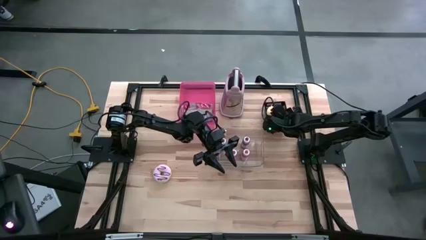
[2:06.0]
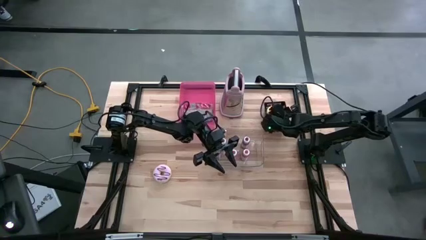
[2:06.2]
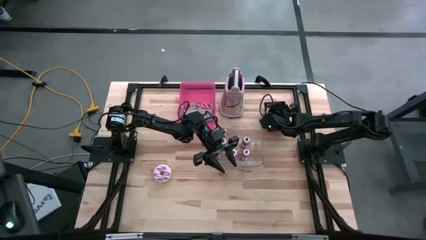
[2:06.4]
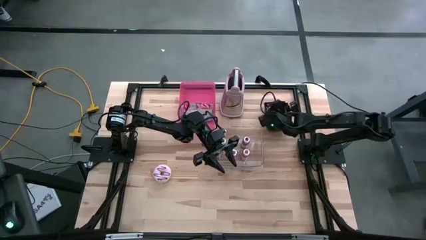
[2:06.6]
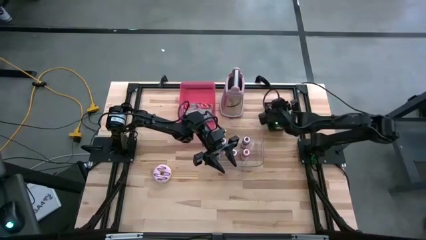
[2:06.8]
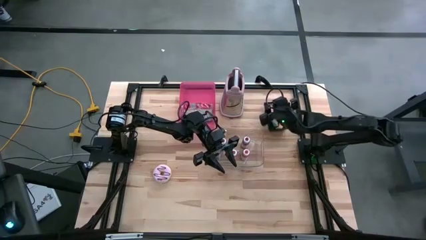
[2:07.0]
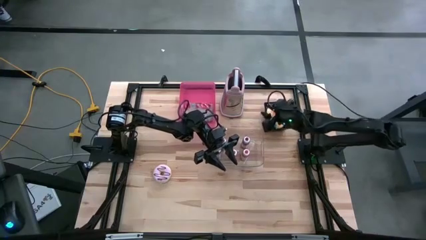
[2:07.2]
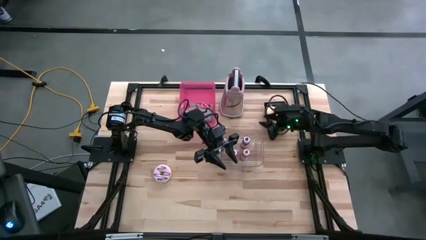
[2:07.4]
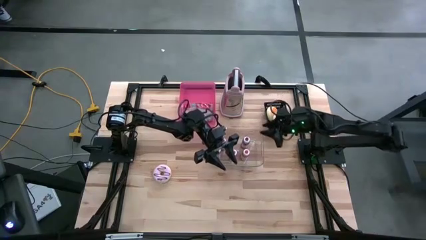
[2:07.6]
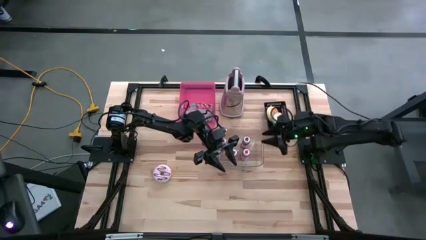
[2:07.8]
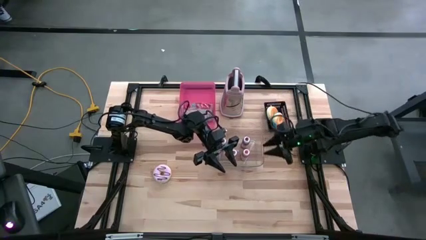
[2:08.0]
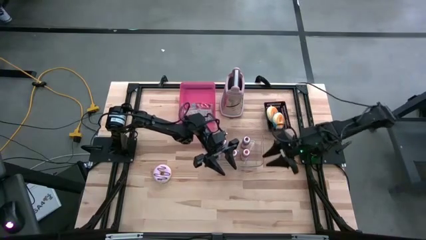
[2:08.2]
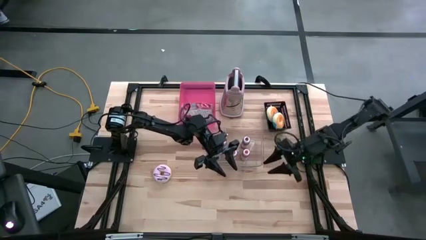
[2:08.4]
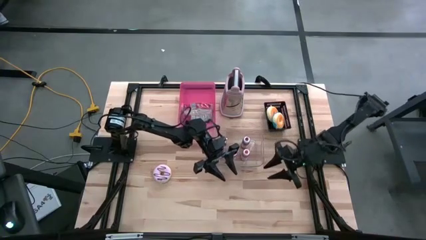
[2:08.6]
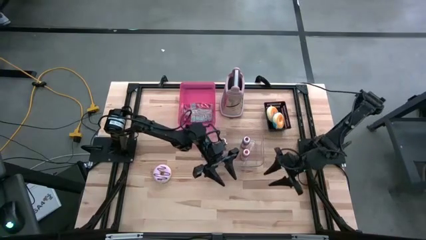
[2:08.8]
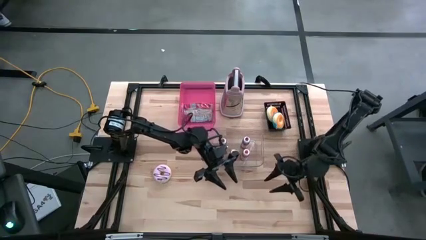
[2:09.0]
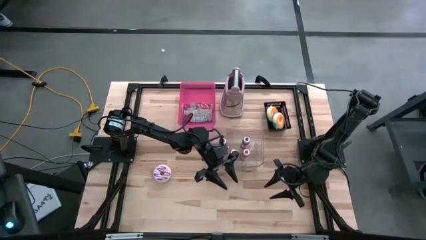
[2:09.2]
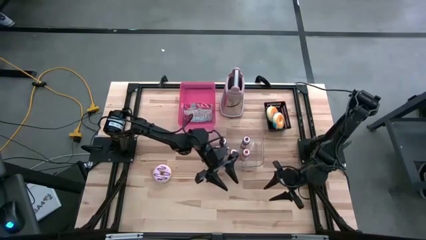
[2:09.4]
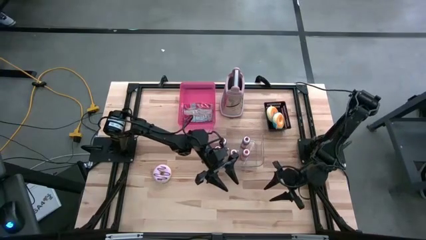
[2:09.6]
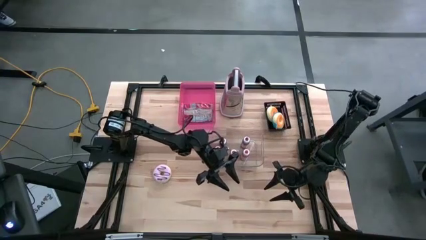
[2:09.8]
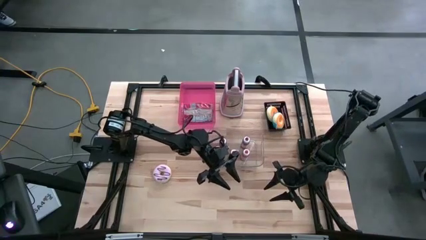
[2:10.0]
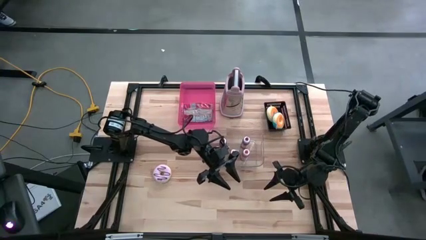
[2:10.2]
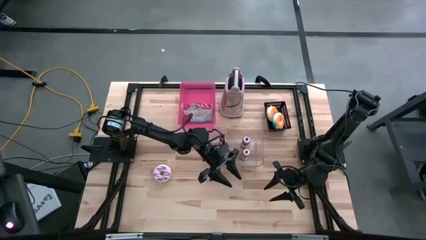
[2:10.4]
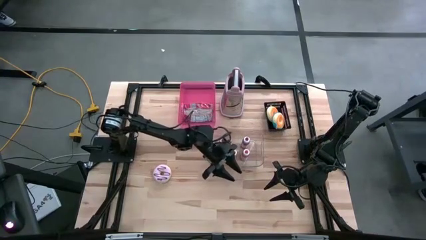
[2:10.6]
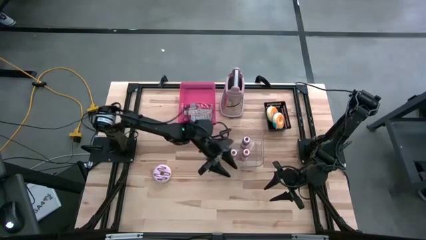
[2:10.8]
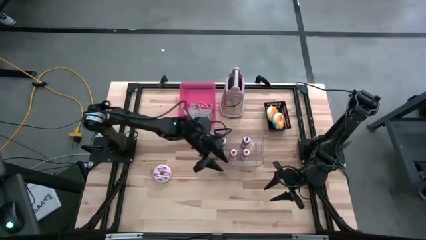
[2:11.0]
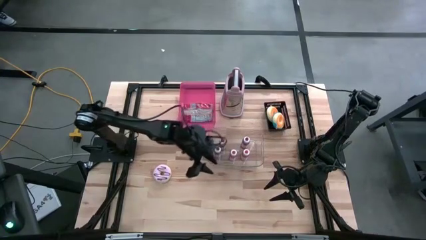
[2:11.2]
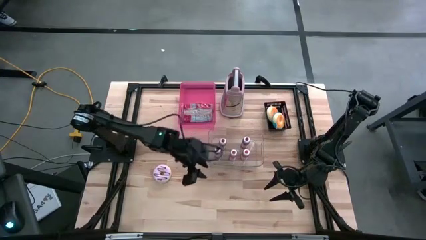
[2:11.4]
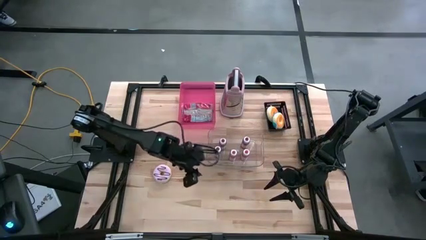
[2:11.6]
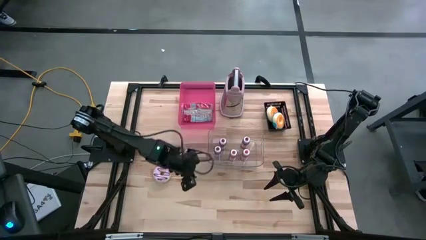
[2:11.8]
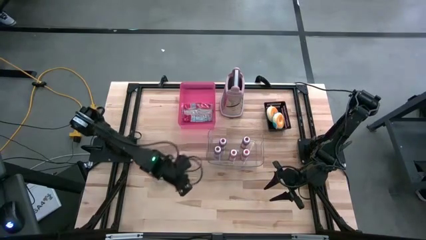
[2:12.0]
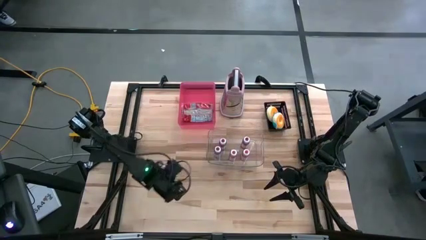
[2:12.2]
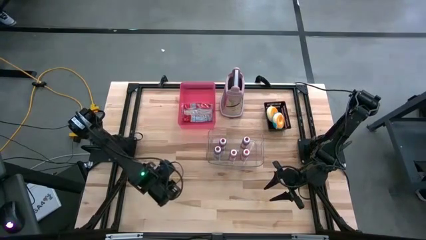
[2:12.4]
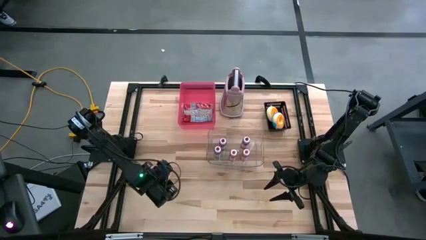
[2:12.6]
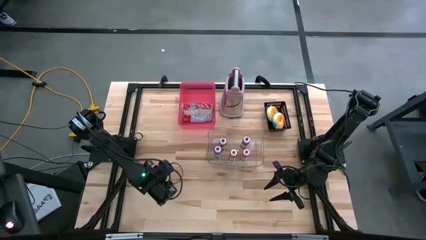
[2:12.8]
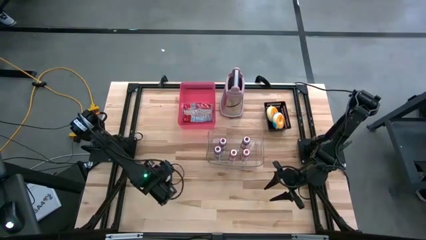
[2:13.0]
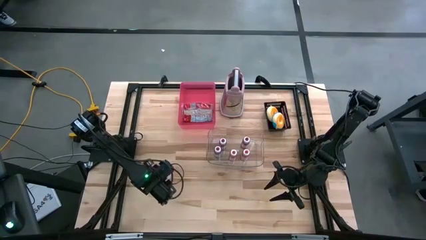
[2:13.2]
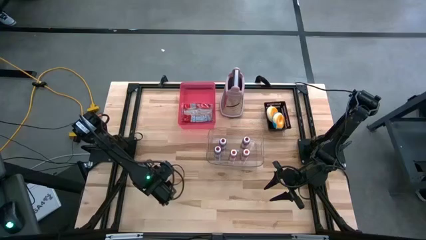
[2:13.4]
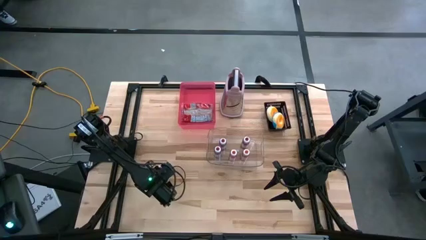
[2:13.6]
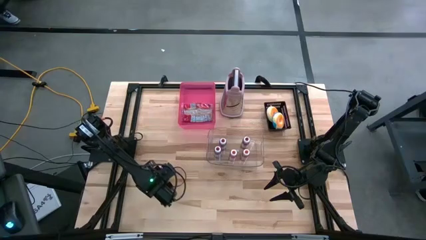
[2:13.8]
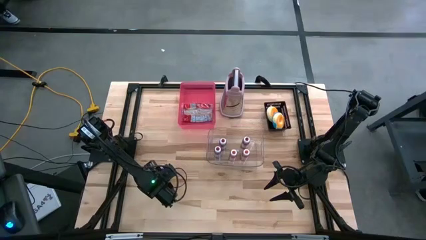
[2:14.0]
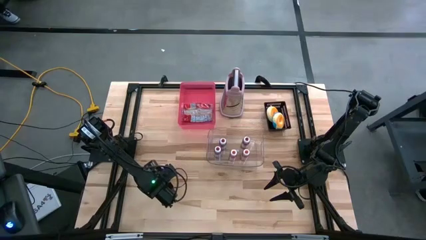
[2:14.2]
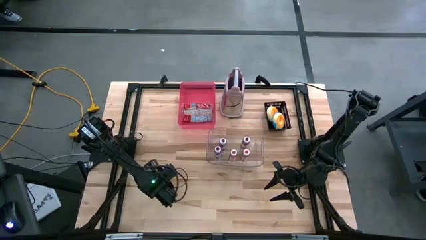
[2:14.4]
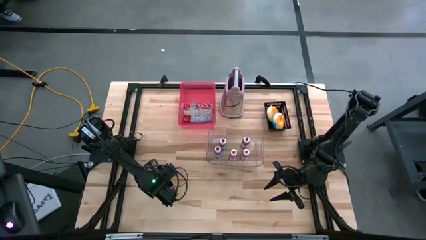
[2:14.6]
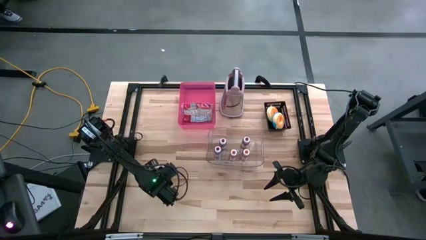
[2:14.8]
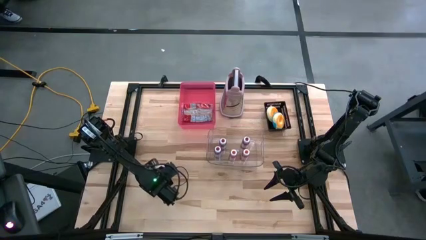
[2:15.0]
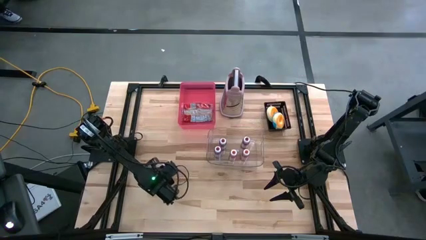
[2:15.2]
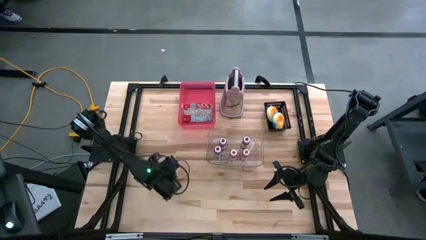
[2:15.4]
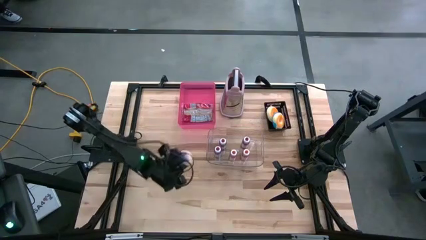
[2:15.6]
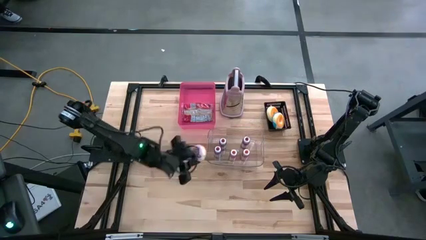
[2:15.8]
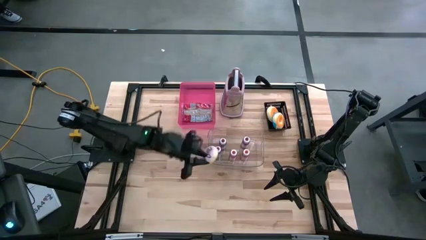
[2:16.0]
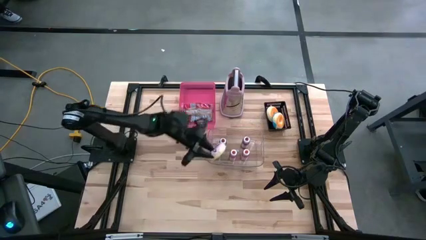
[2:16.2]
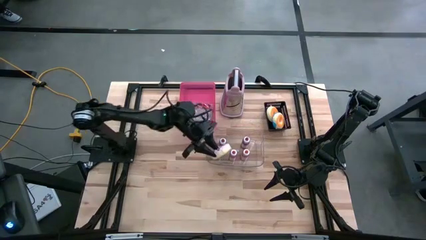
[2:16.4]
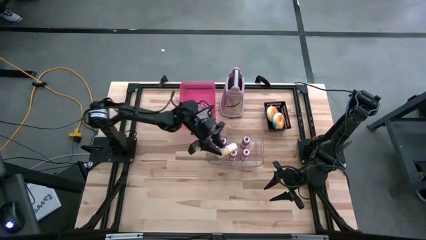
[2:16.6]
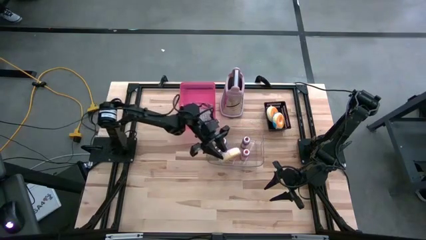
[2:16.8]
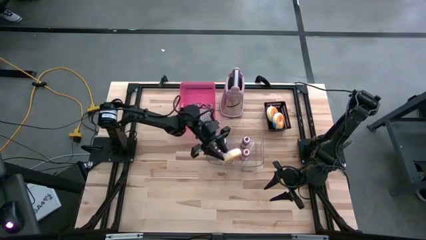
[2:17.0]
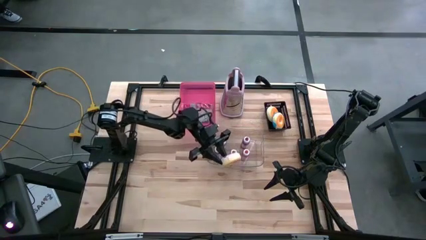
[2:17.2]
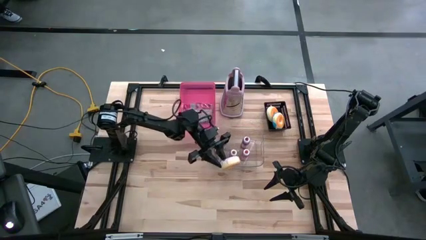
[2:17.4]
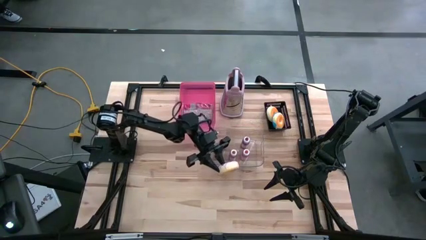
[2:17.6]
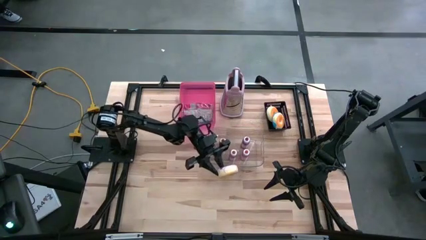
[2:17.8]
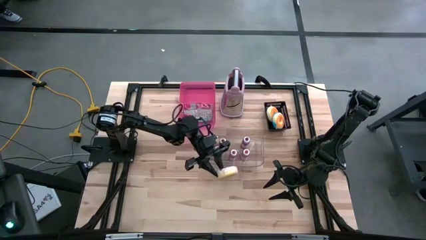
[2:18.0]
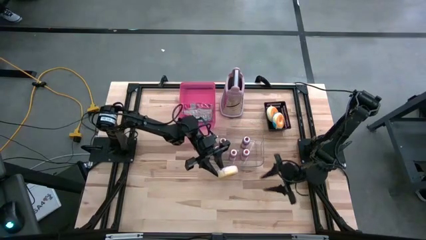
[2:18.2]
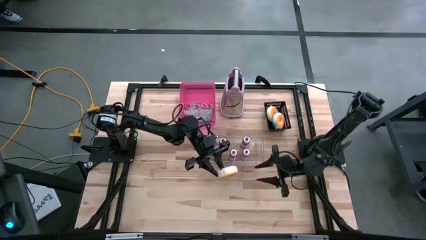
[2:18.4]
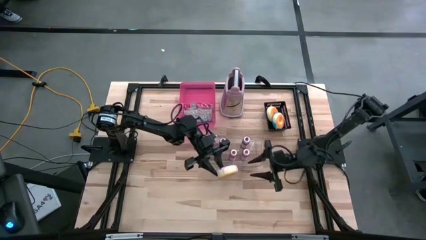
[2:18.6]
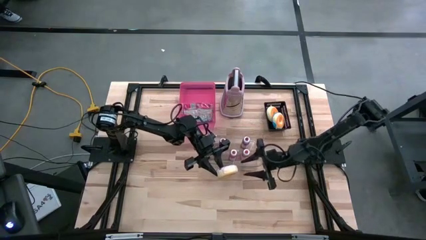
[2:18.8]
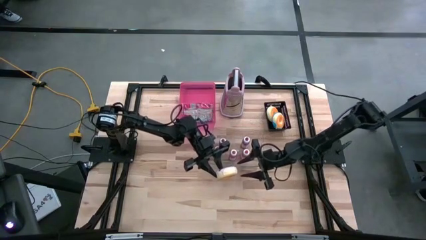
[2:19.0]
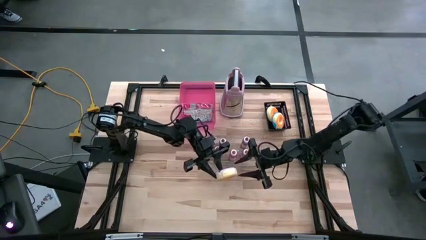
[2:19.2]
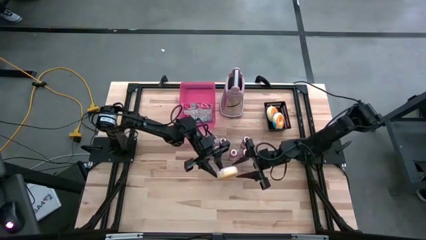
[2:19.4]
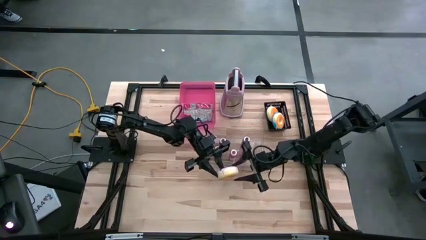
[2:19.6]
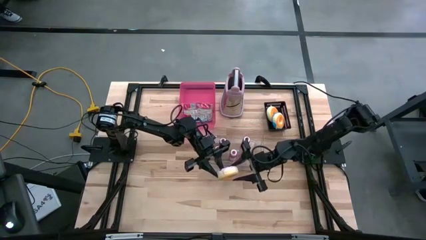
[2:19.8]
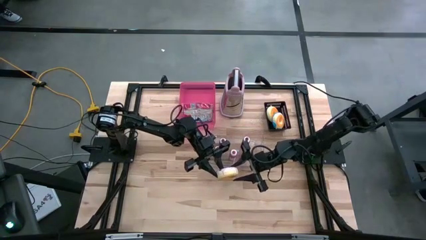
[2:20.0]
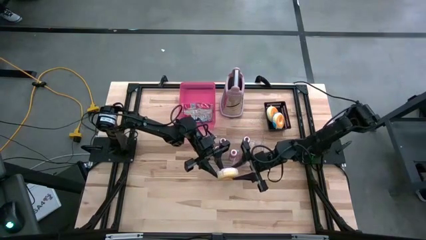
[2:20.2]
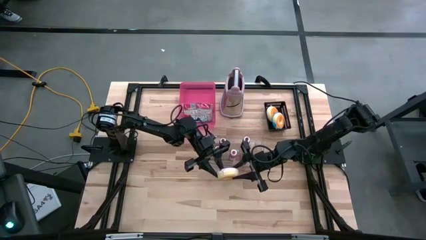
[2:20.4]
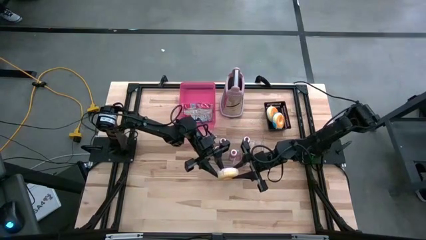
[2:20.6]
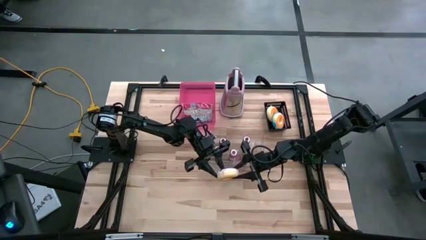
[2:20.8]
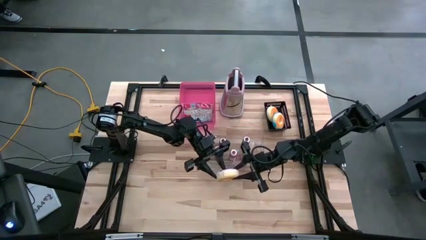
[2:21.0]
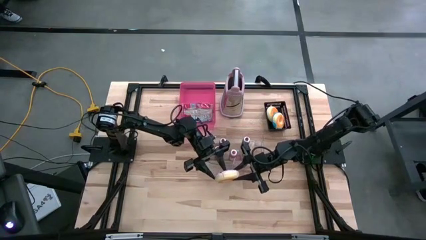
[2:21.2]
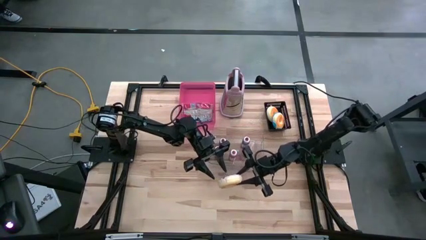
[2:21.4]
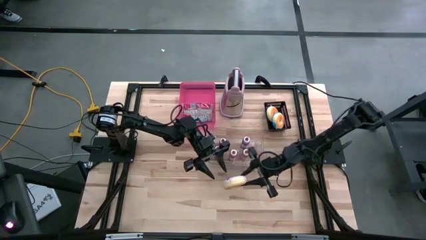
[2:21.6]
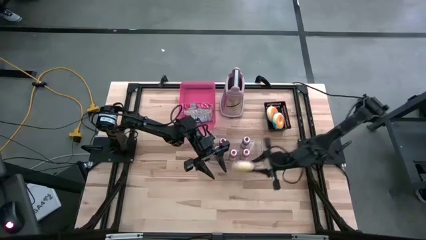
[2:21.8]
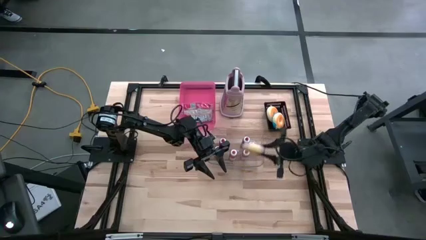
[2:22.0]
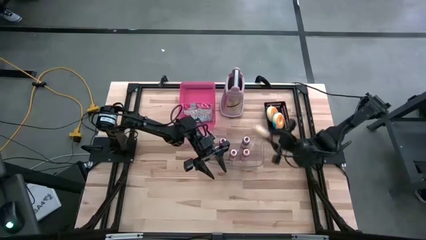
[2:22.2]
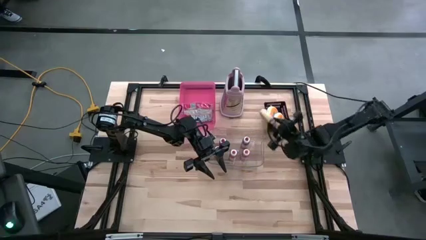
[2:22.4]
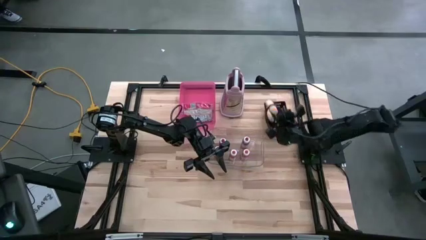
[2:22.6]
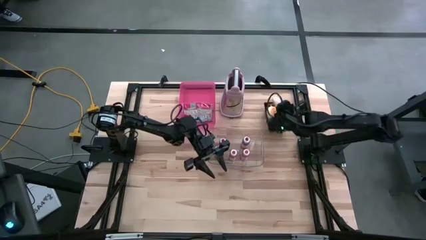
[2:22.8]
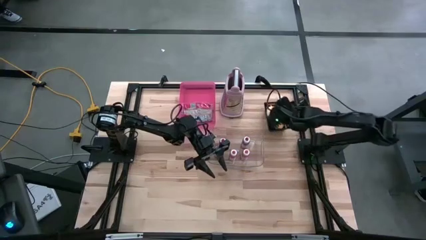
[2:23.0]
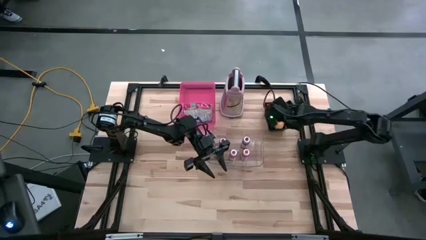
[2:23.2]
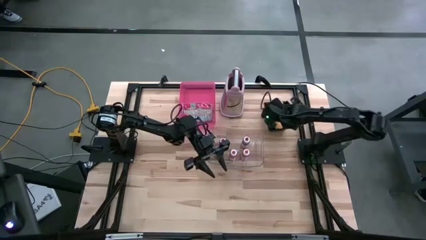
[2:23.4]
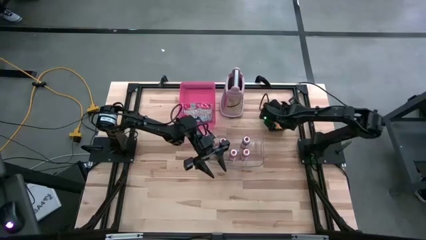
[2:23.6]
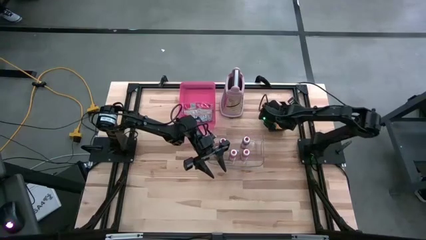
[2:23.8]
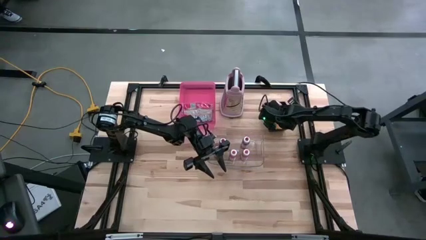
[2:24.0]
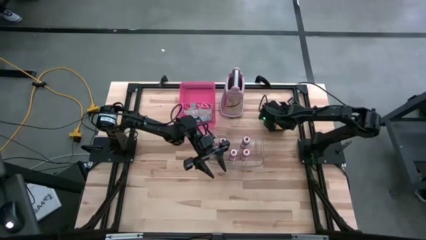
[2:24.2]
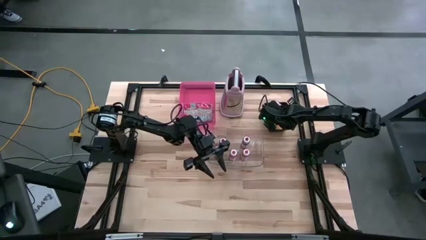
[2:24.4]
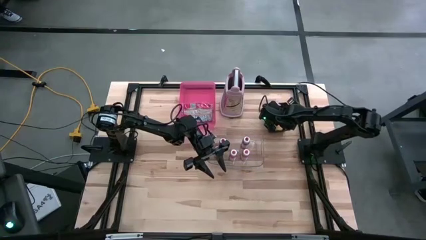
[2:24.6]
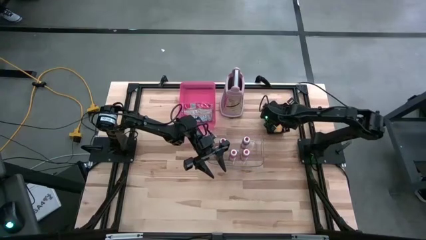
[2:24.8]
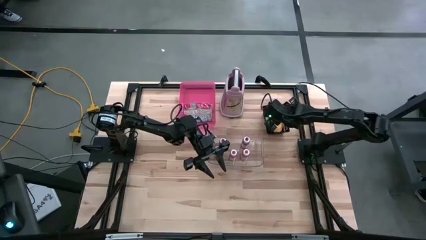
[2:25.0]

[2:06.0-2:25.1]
Put the pink donut into the black bin
